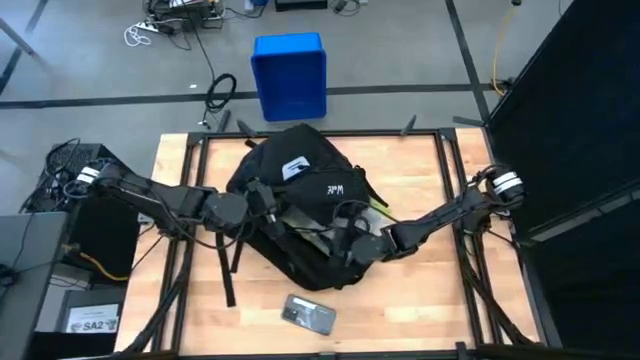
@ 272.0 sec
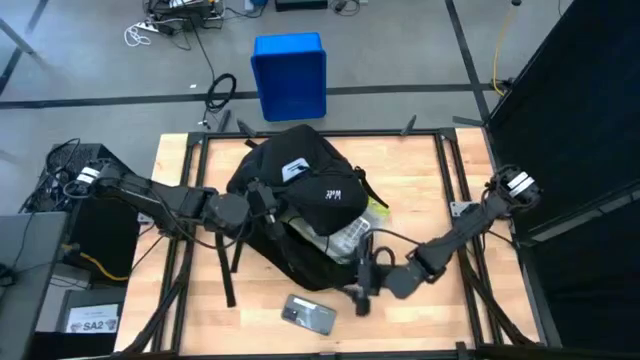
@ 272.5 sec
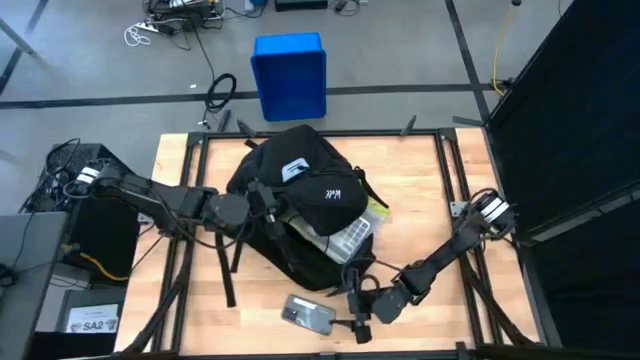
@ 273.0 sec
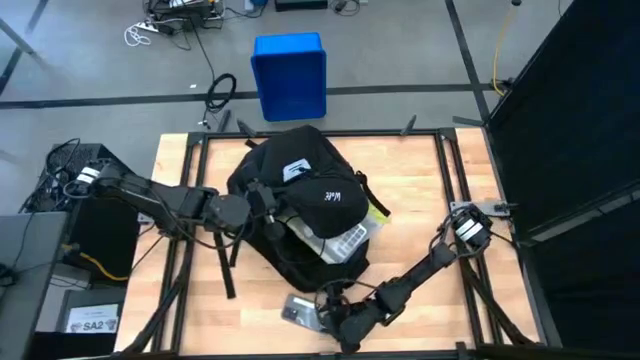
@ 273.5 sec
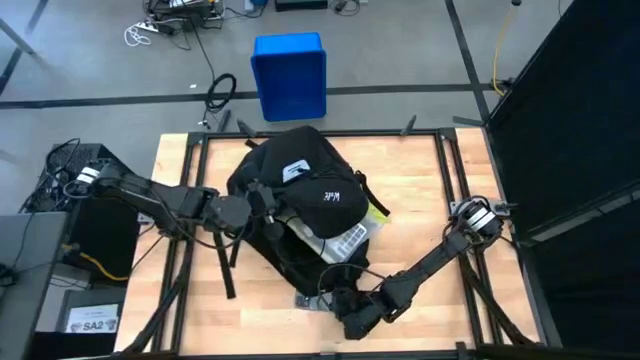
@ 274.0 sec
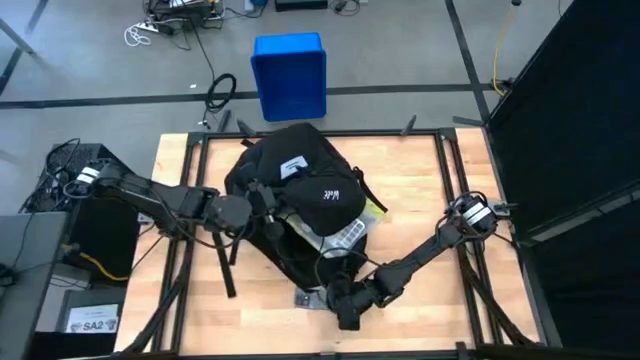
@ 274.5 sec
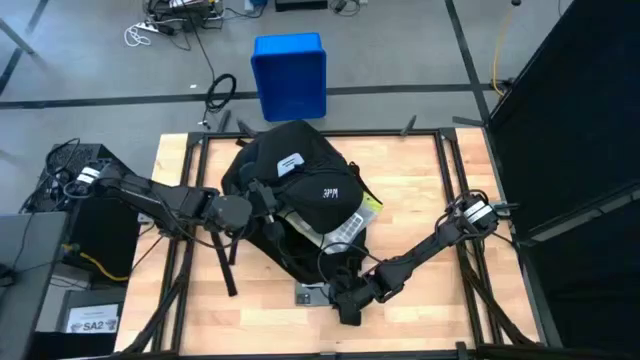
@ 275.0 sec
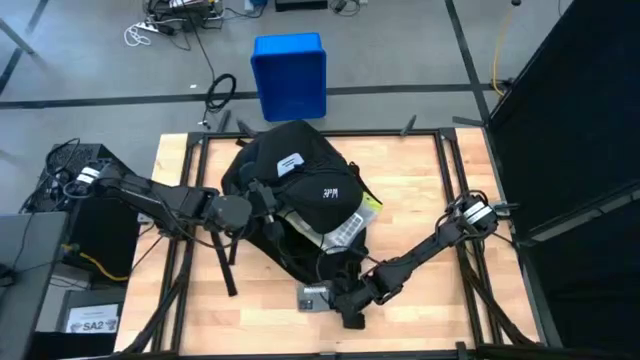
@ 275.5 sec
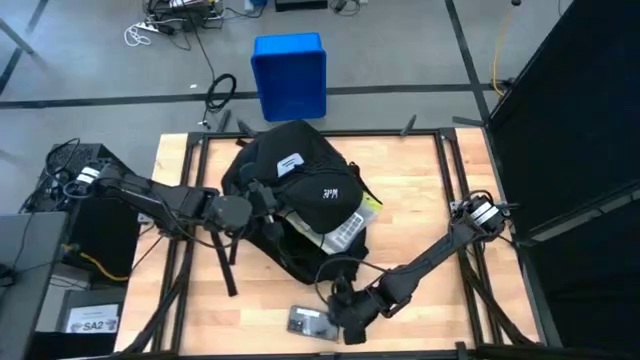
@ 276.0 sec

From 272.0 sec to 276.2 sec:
Task: Unpack backpack
Put the cellphone into the backpack

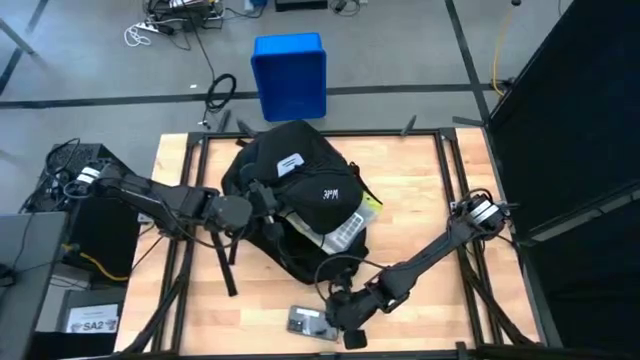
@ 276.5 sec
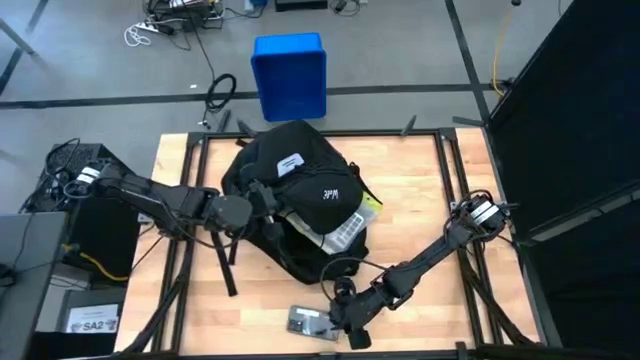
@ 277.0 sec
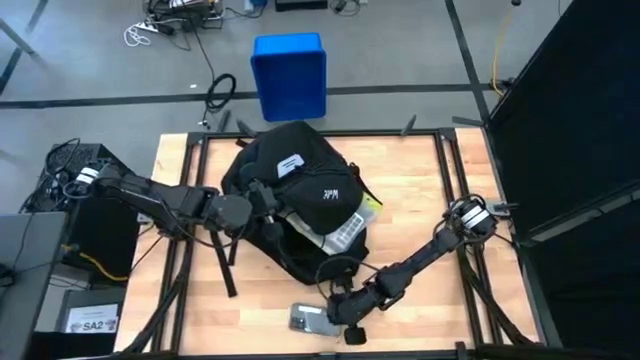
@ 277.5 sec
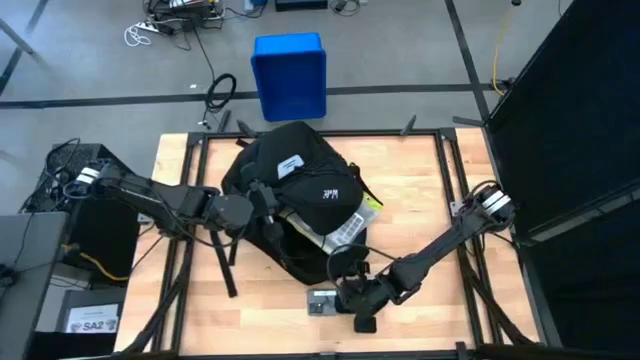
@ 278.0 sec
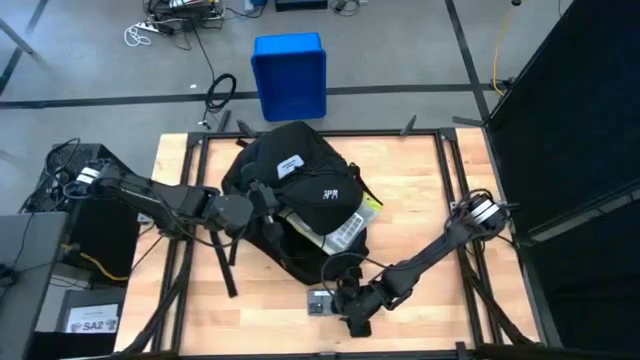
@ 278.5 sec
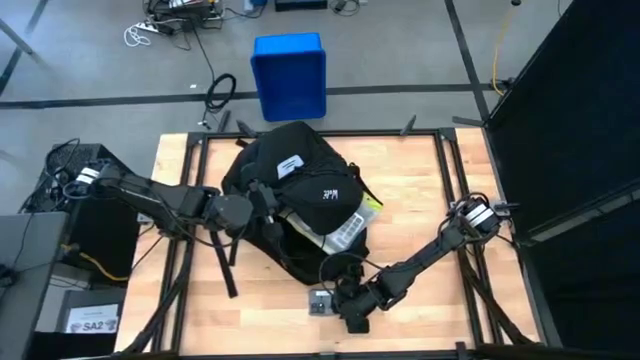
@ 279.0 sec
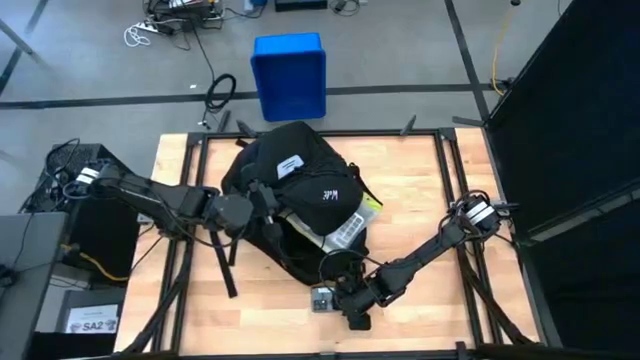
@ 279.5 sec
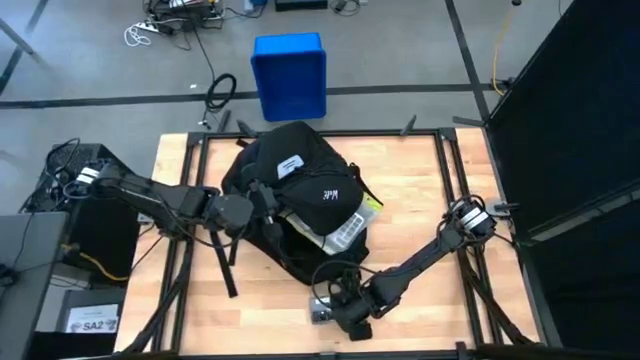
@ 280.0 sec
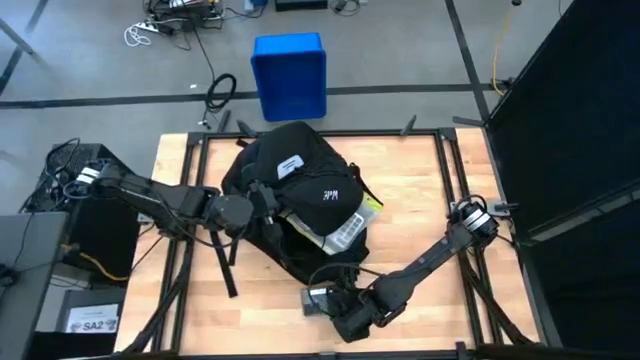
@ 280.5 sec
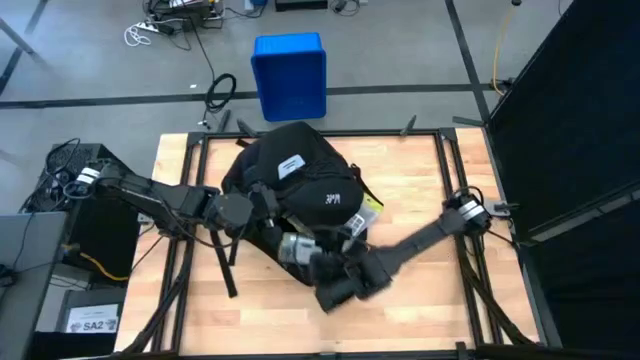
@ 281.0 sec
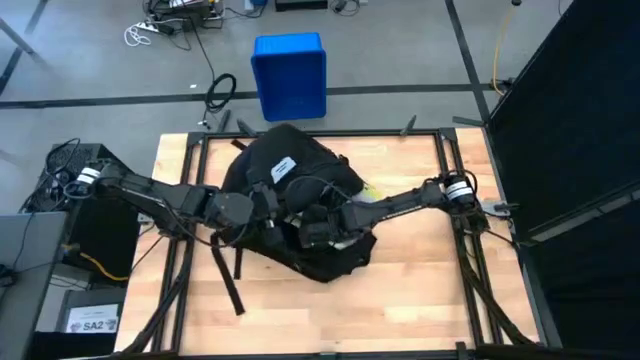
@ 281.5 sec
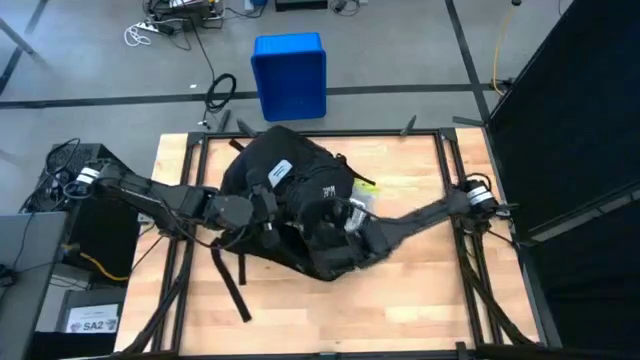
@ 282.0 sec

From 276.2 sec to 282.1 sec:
Put the cellphone into the backpack

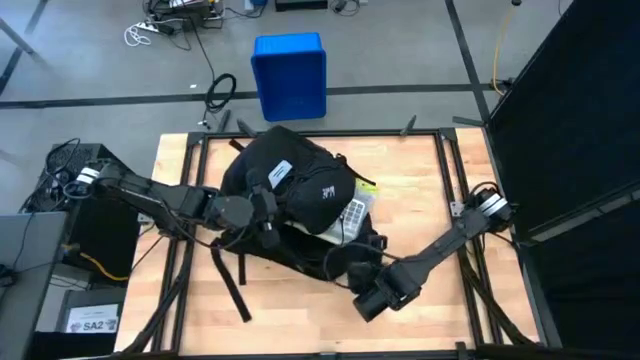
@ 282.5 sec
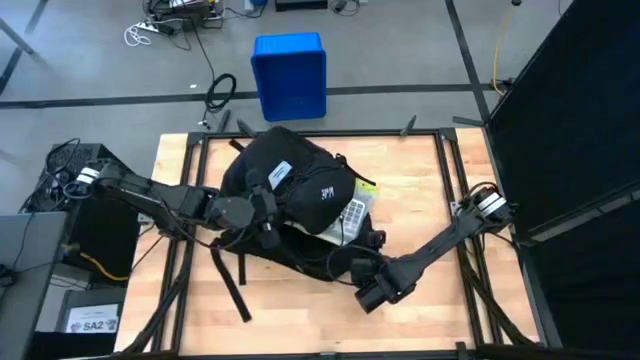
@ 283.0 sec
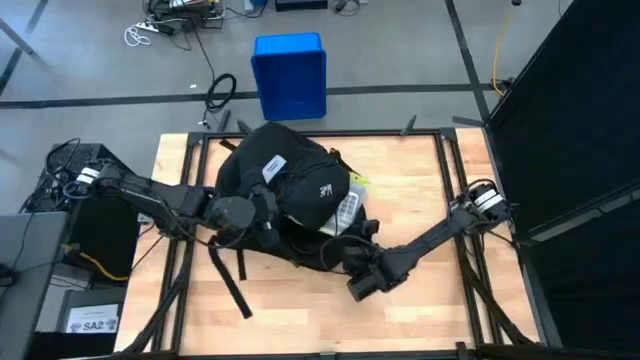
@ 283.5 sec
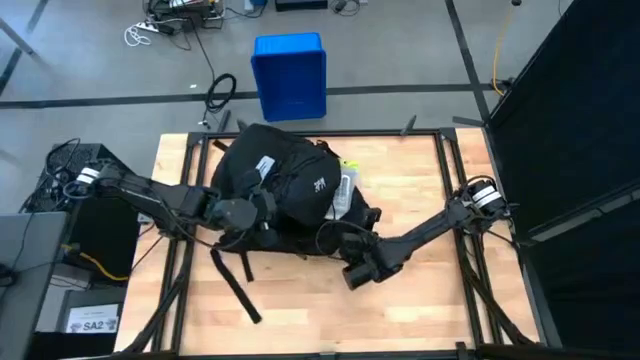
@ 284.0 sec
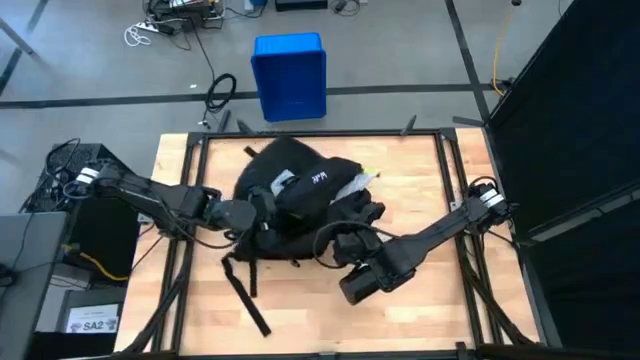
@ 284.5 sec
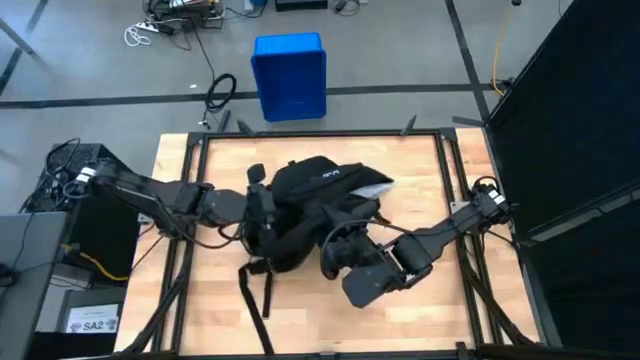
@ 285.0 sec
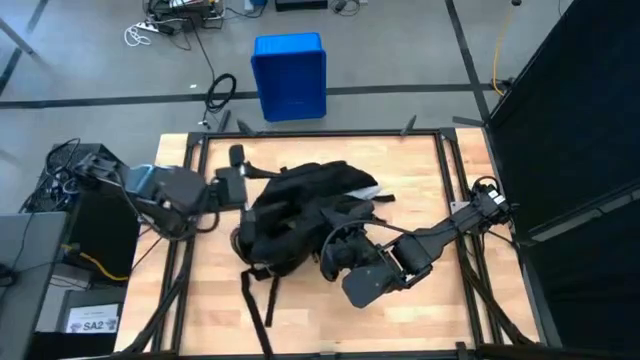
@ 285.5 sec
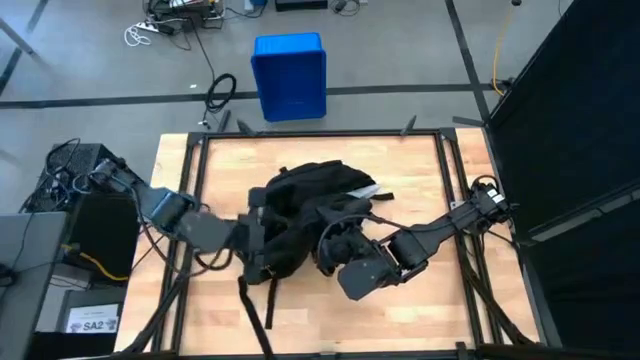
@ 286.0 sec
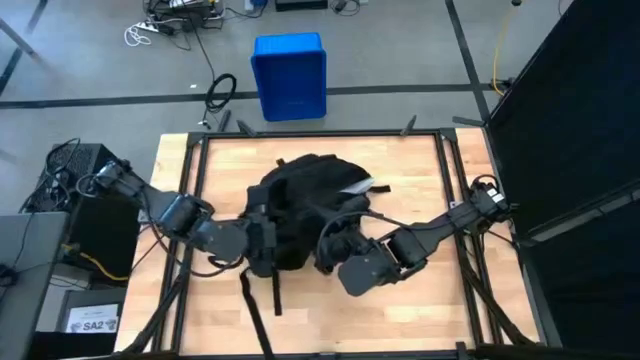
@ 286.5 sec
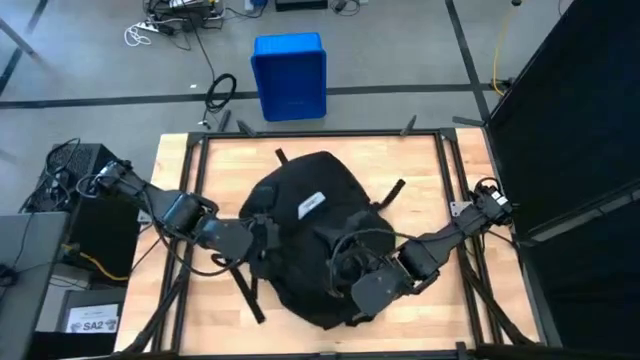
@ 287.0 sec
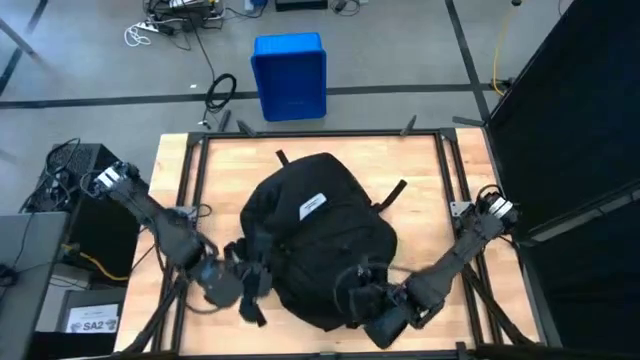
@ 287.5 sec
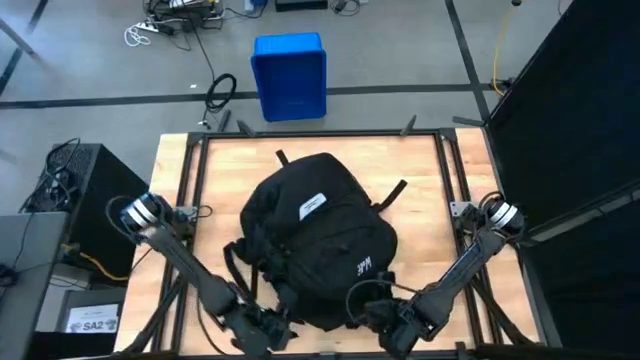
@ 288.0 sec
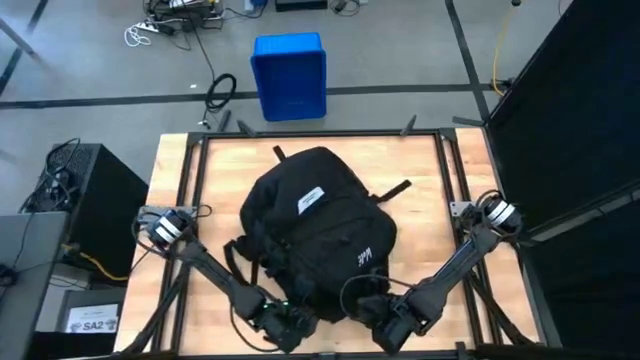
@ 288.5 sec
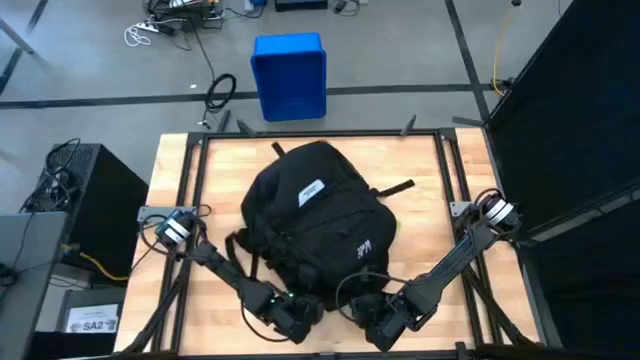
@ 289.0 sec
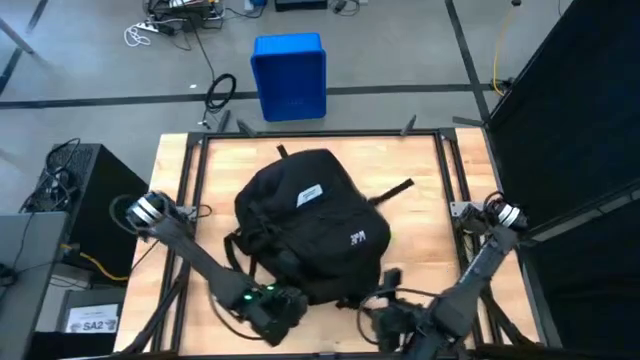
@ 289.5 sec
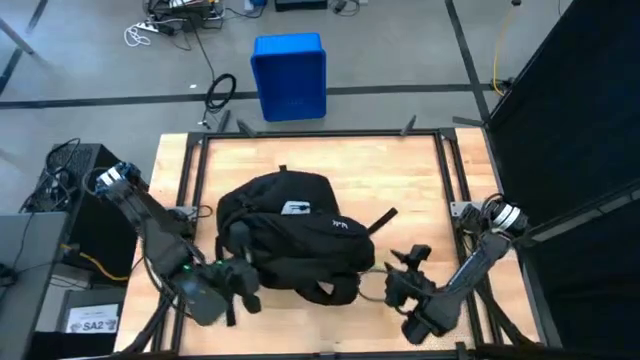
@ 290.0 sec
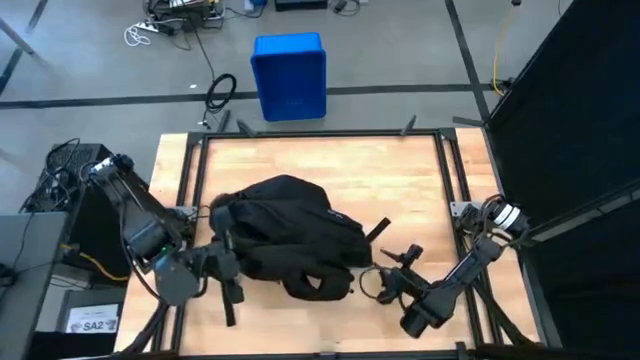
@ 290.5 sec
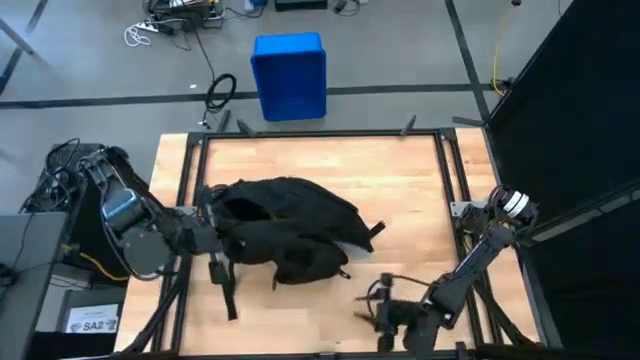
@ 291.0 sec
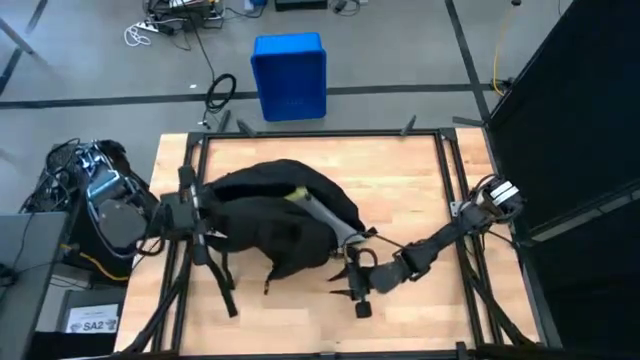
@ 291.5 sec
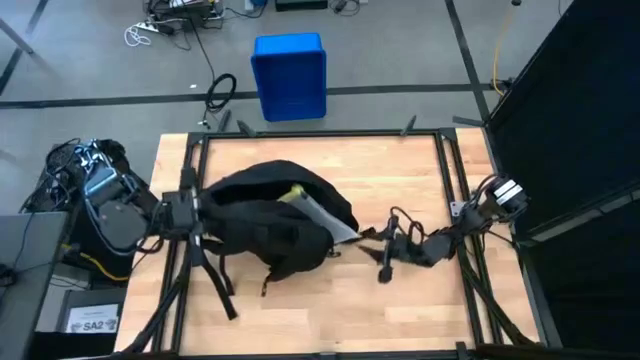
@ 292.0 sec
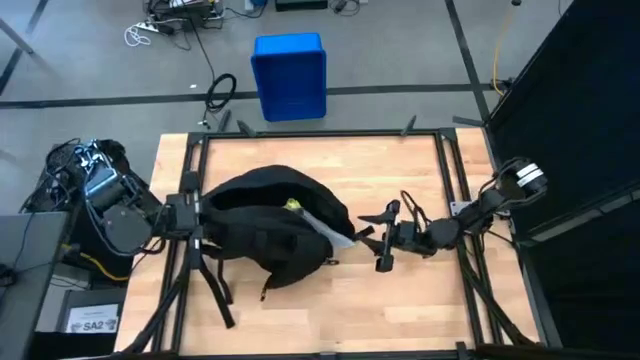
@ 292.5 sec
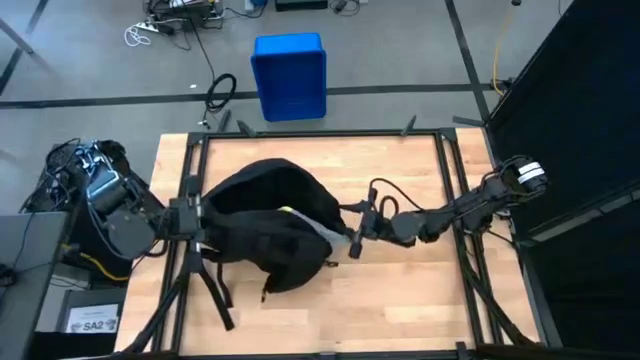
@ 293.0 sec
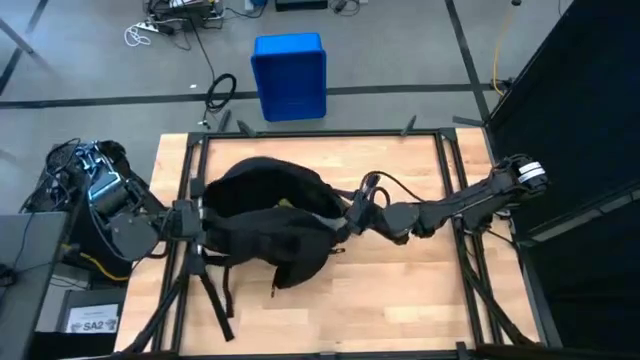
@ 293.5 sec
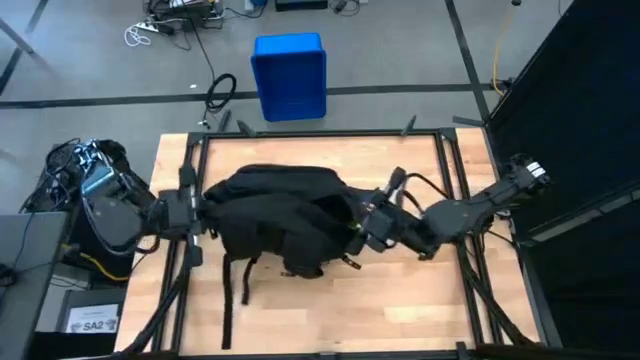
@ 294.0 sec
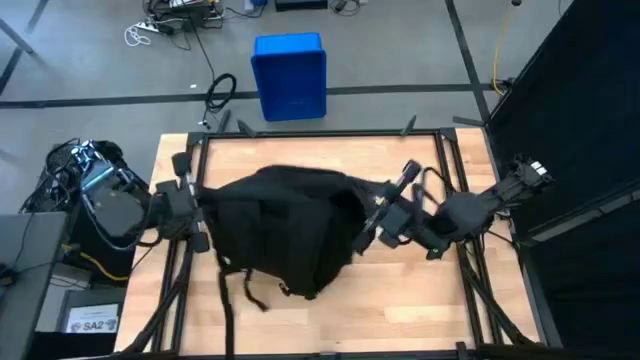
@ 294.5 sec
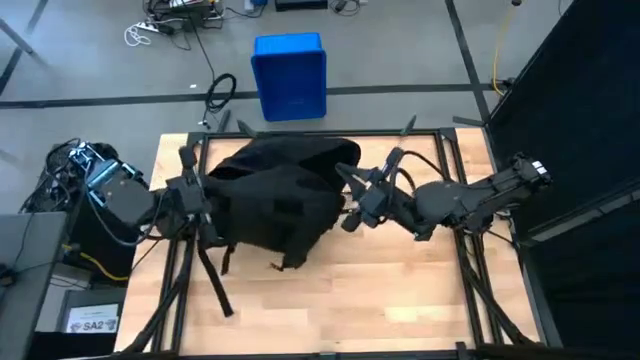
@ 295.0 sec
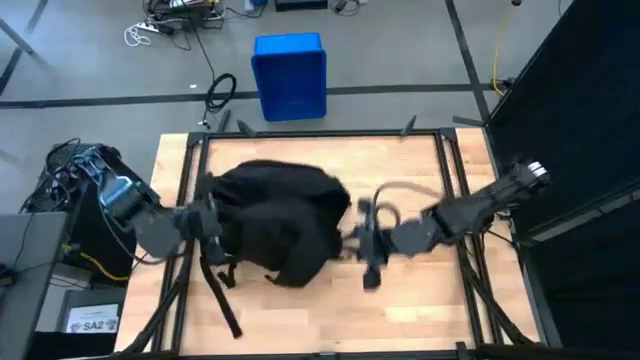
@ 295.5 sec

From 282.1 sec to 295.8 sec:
Close the backpack
